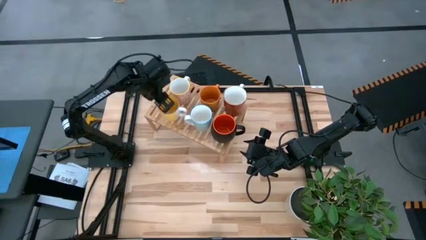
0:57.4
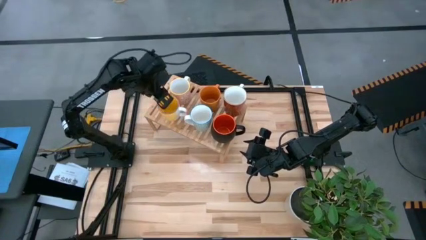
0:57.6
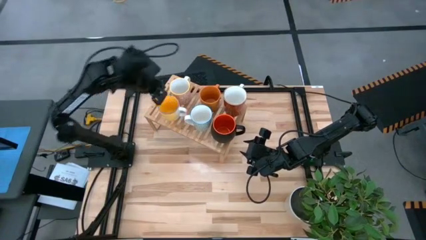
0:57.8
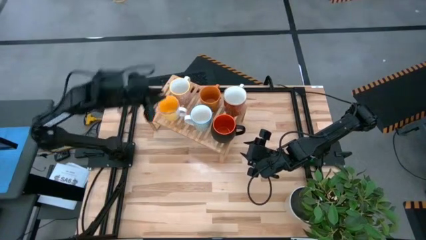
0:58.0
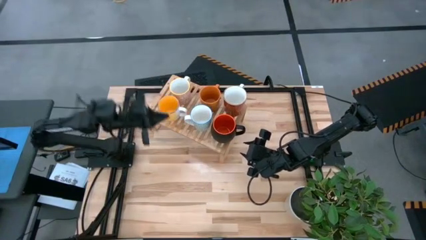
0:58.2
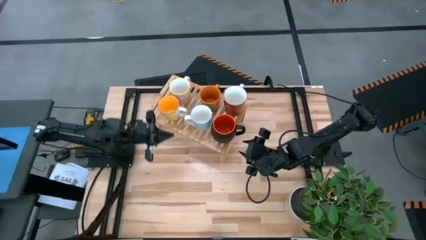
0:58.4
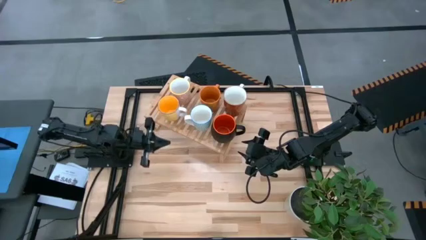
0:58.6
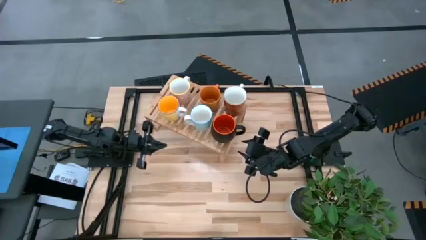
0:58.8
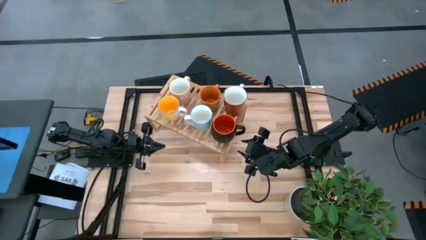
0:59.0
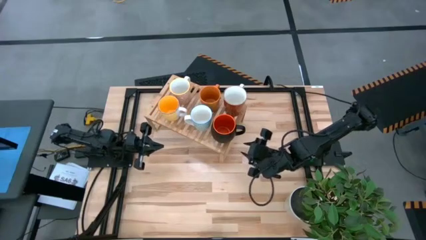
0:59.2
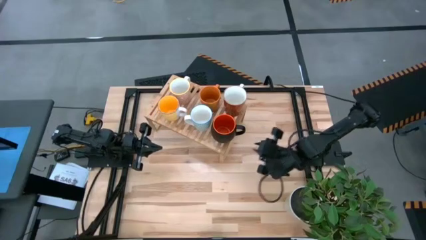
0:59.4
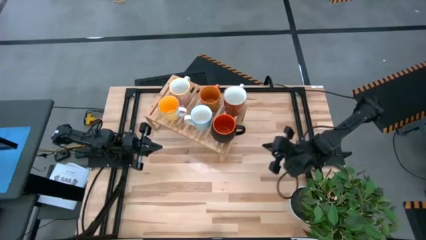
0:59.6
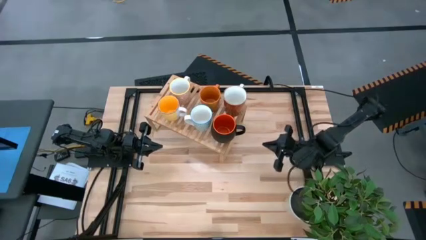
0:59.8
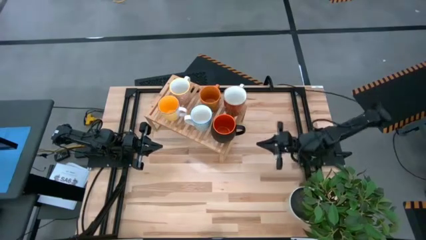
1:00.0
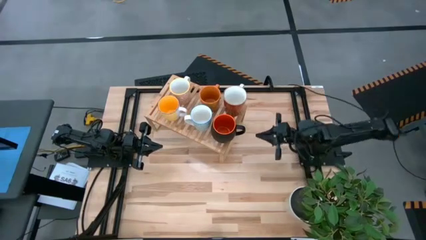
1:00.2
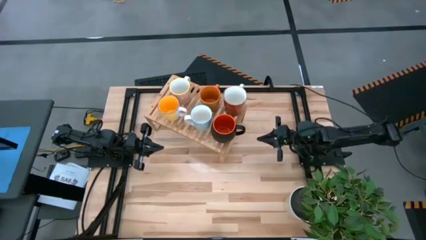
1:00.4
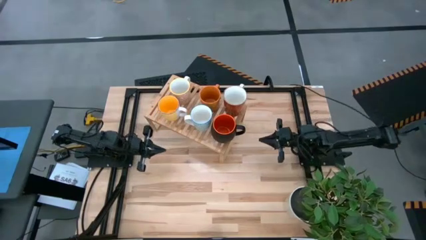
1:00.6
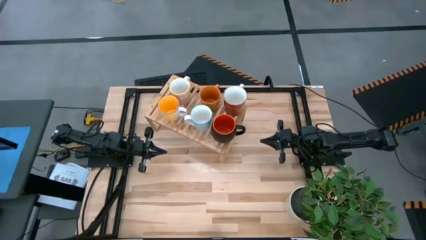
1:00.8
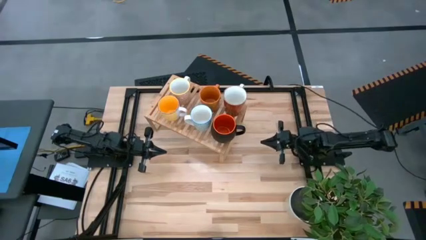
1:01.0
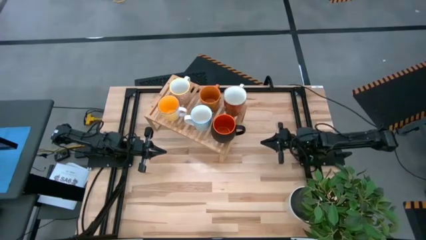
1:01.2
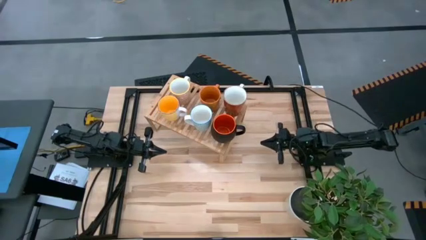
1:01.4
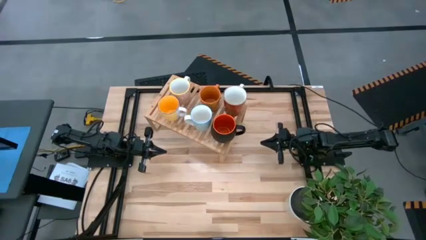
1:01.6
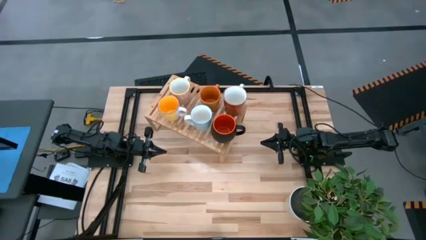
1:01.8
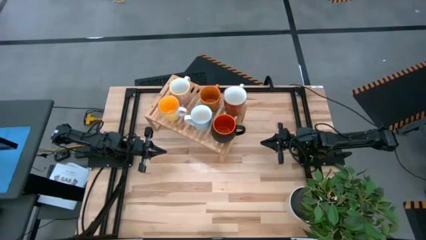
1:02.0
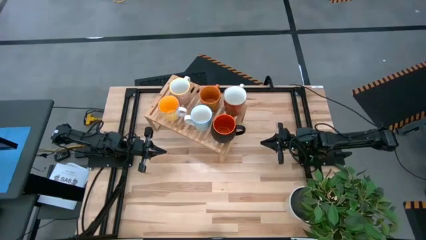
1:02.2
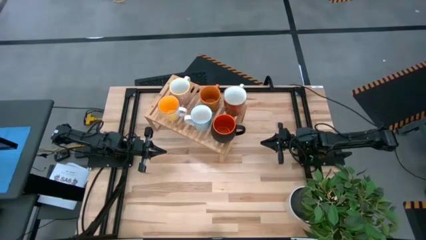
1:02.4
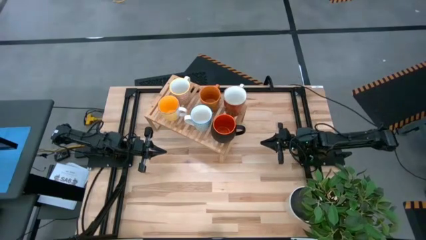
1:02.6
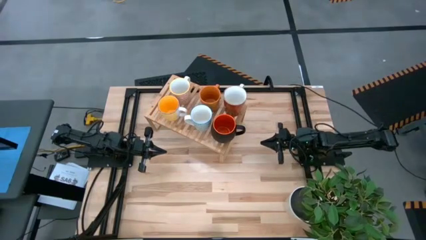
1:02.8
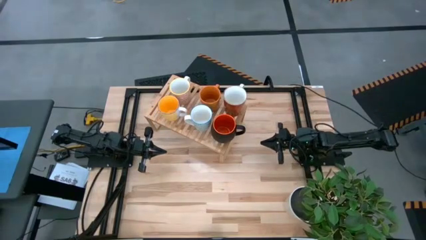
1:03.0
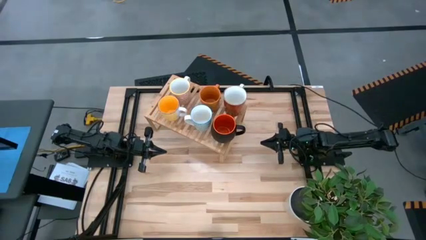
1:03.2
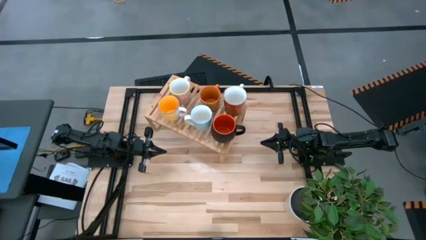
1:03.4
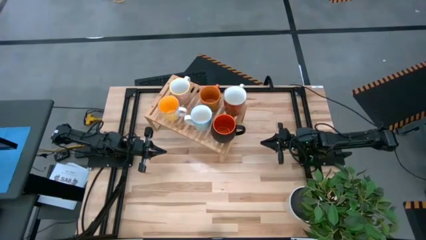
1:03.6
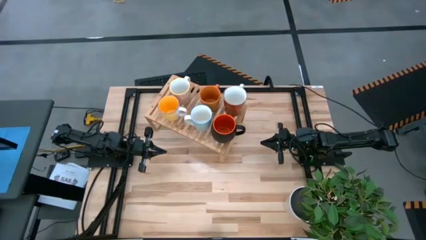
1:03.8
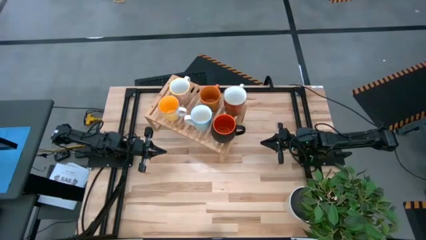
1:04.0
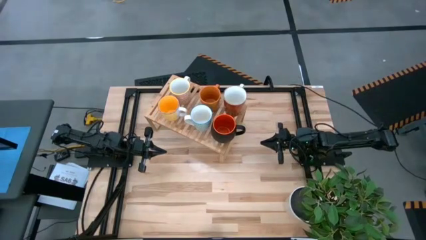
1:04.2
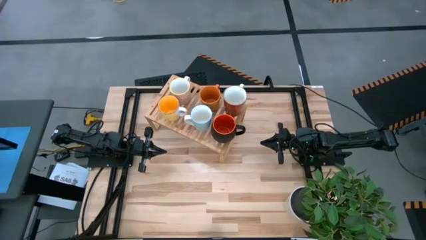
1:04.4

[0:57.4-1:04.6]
Task: Place coffee mugs
Return to Home Position

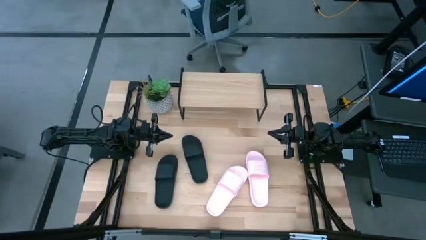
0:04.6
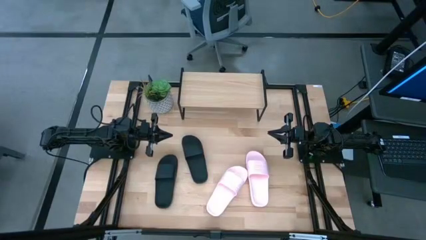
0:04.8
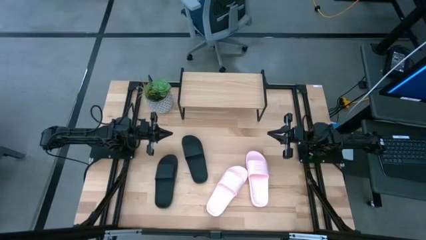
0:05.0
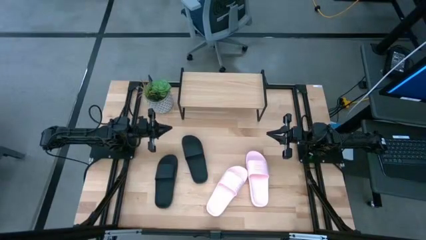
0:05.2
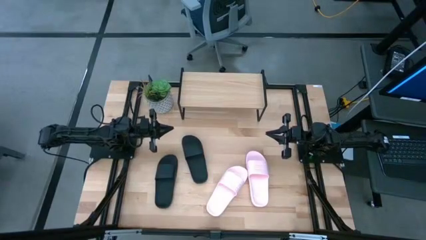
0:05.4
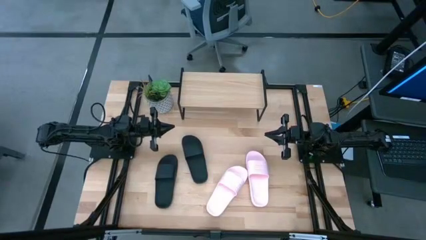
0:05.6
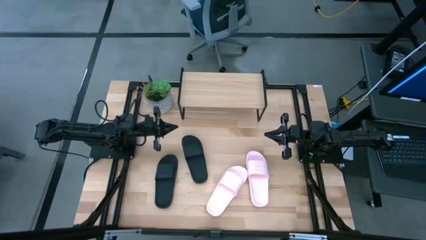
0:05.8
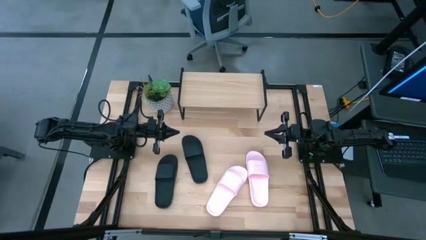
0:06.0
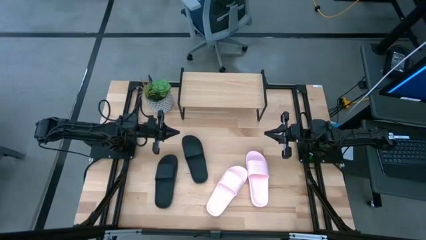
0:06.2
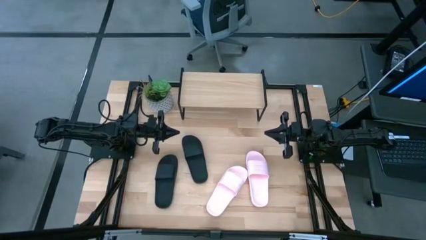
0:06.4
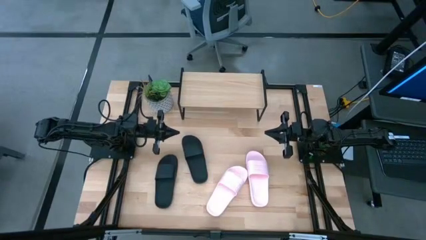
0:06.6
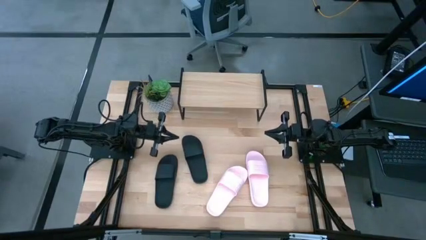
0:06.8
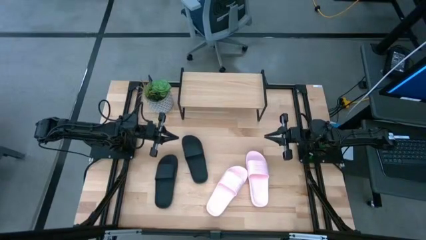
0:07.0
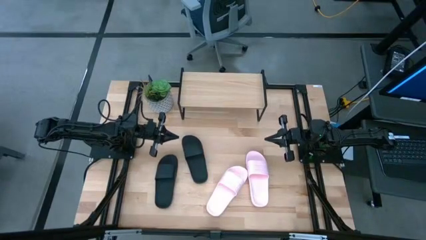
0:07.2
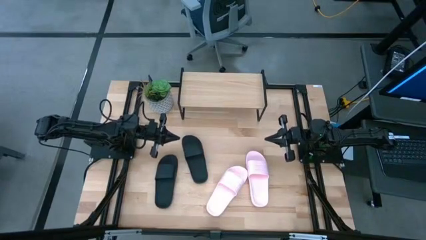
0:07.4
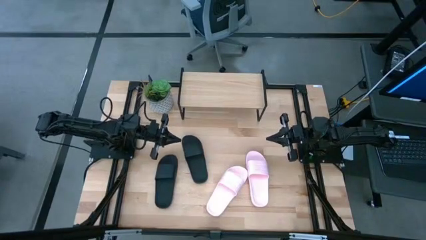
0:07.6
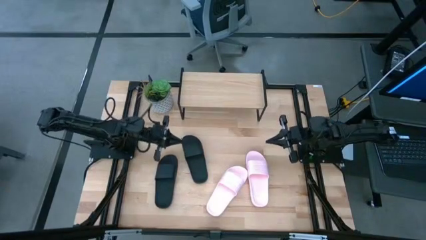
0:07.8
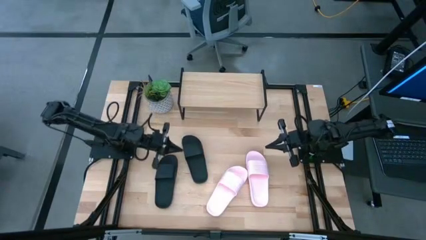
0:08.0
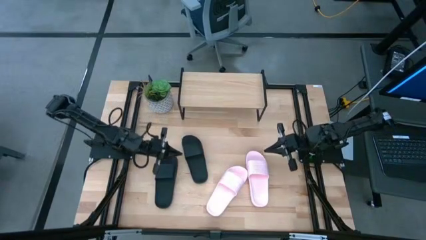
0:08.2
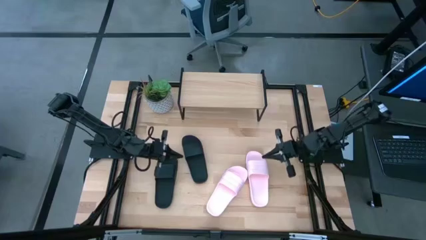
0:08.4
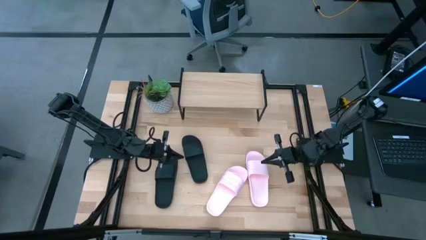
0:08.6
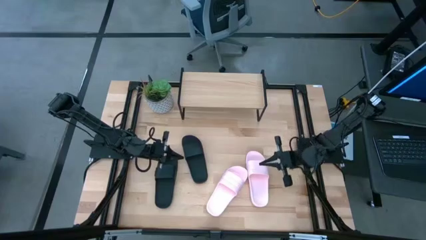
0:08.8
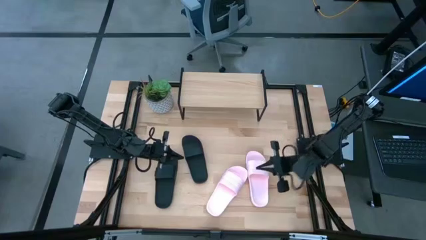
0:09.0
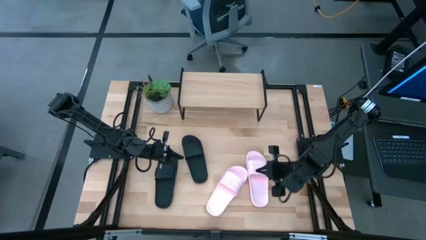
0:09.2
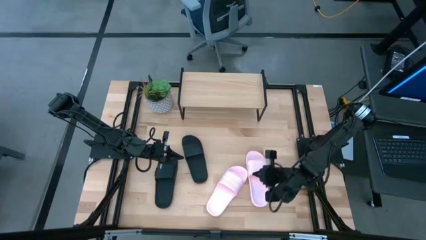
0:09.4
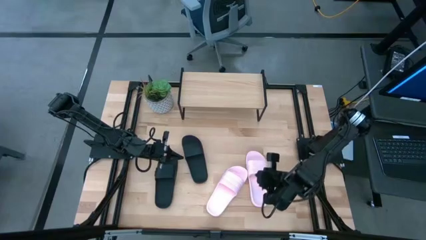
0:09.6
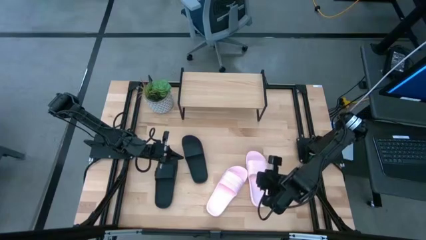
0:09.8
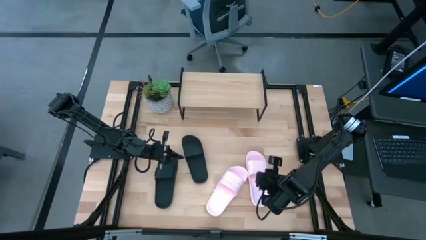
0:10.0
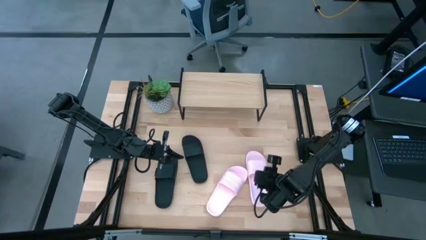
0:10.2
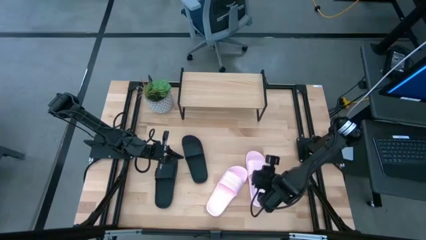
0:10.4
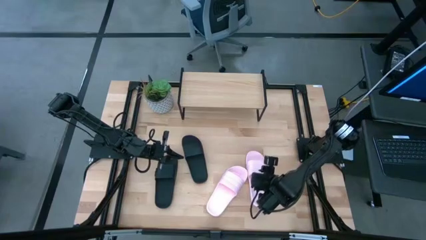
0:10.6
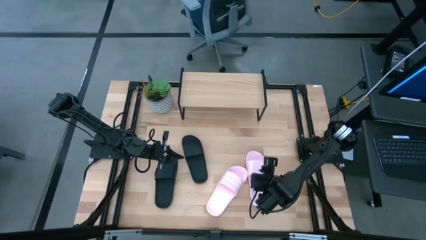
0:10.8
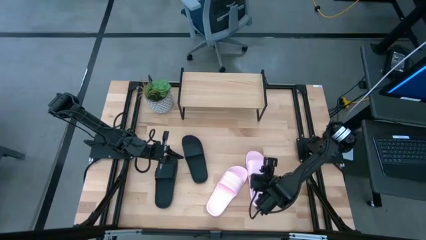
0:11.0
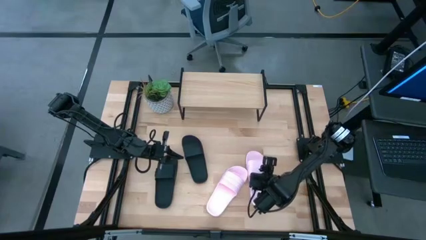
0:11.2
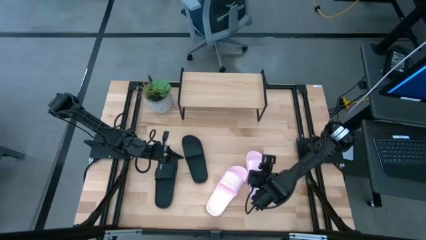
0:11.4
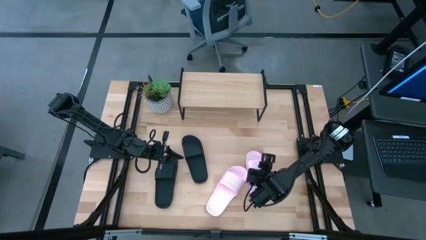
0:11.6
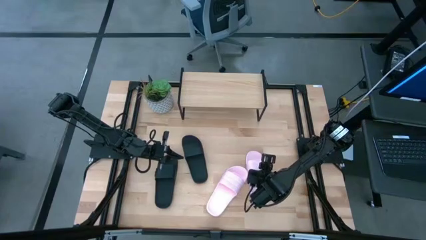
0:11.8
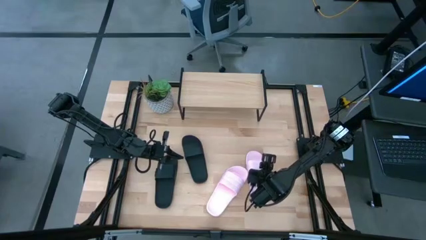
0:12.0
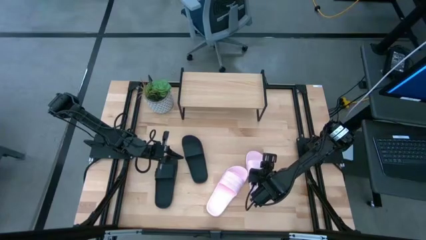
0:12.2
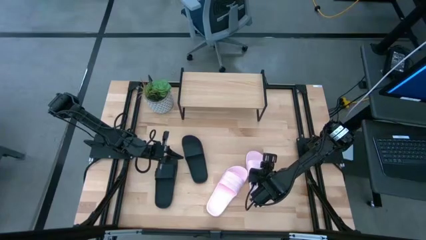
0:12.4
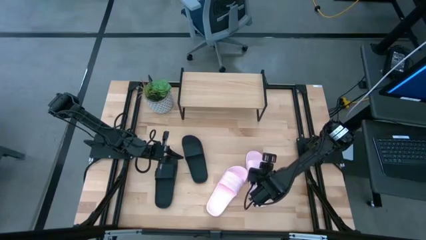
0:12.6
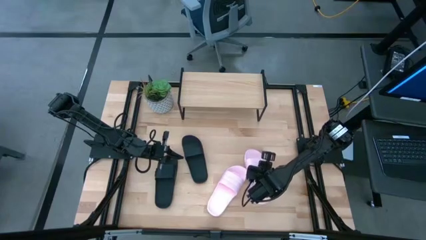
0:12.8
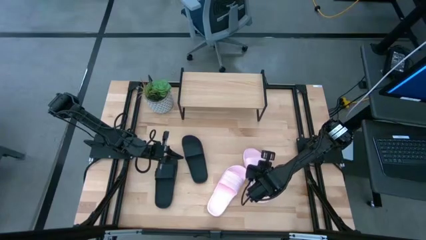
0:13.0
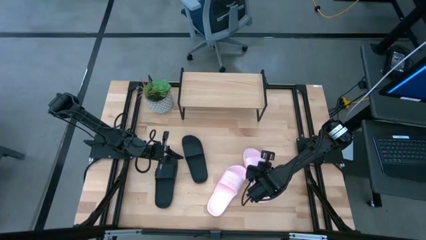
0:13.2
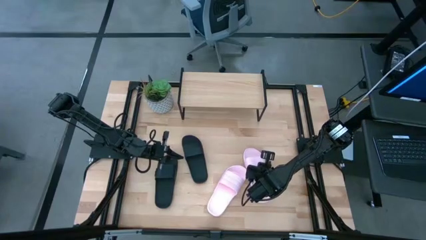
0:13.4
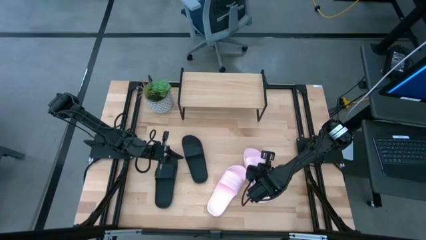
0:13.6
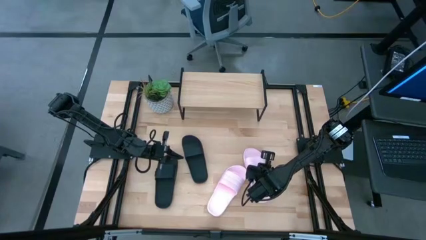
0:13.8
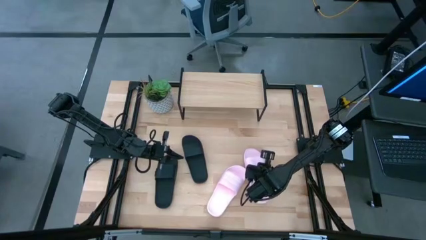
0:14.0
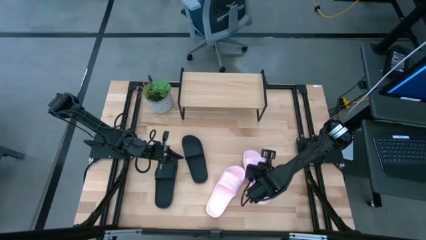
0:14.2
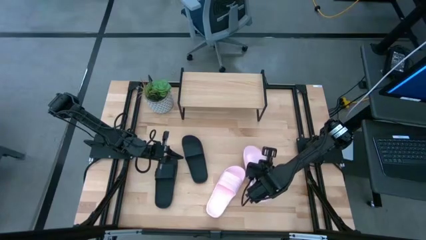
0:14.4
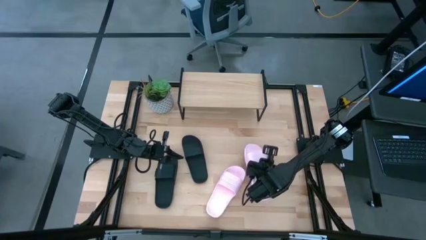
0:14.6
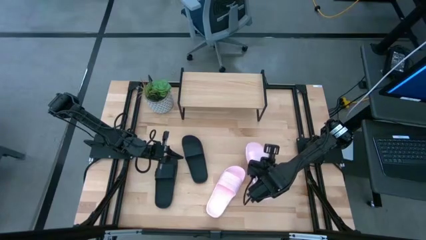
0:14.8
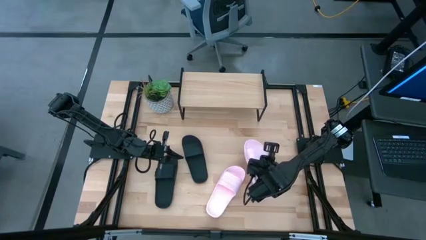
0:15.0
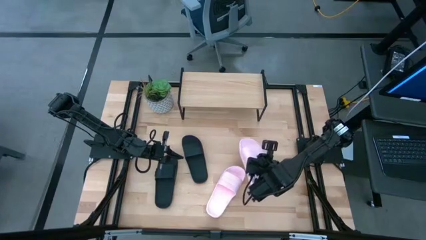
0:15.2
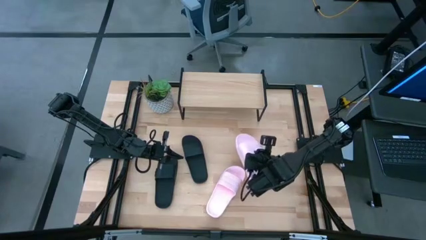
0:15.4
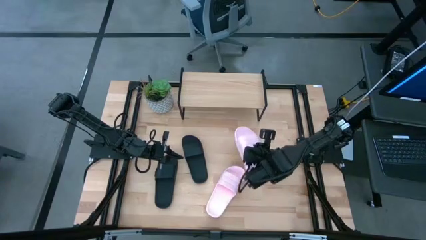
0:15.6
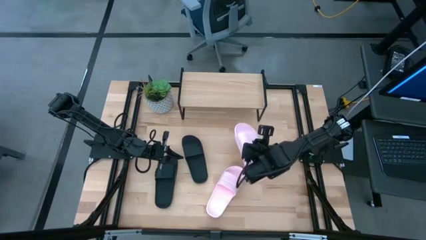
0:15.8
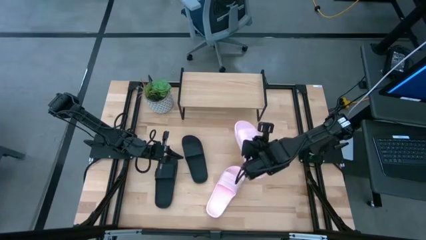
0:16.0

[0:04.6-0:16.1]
Task: Pick and place slides into the shelf
Put the top pink slide on the shelf
